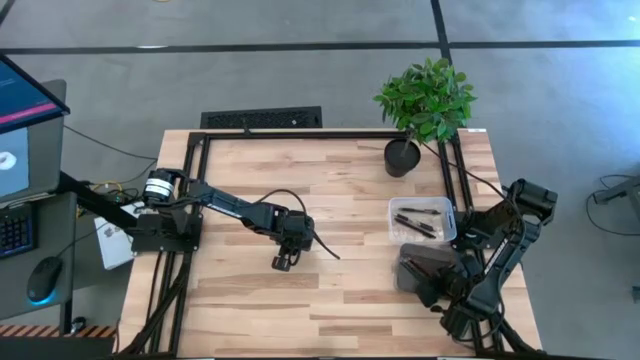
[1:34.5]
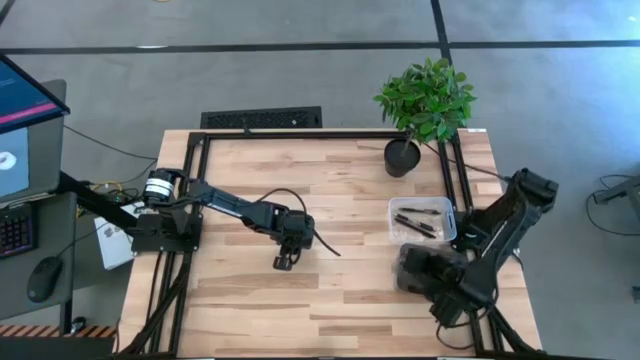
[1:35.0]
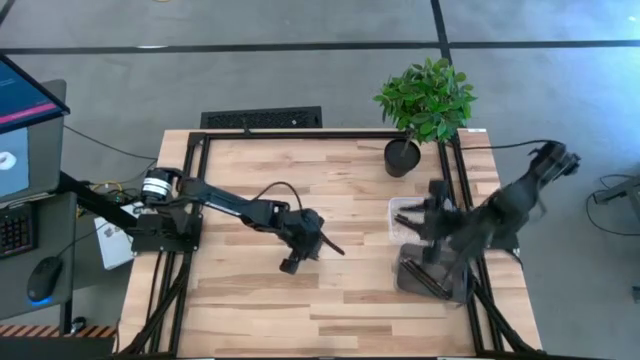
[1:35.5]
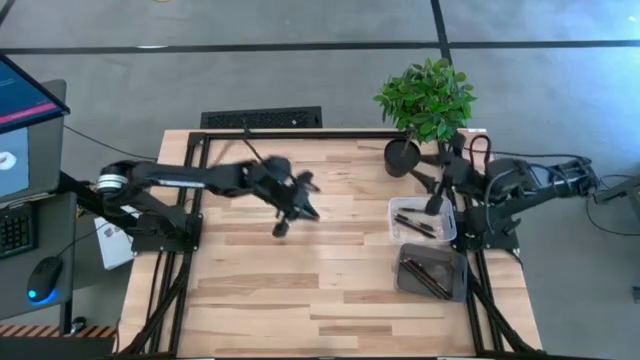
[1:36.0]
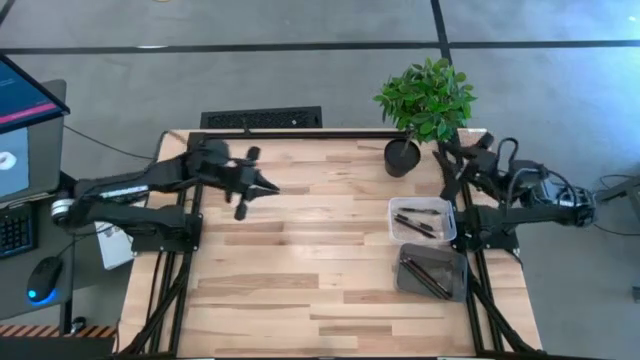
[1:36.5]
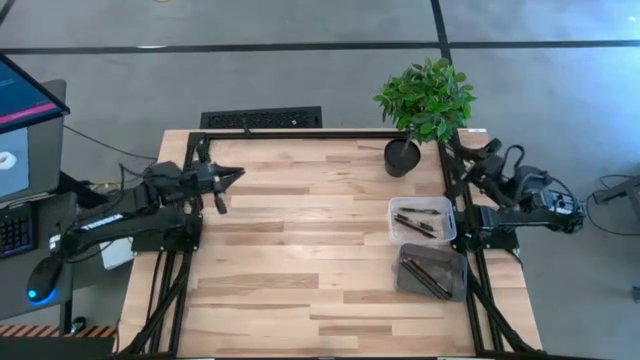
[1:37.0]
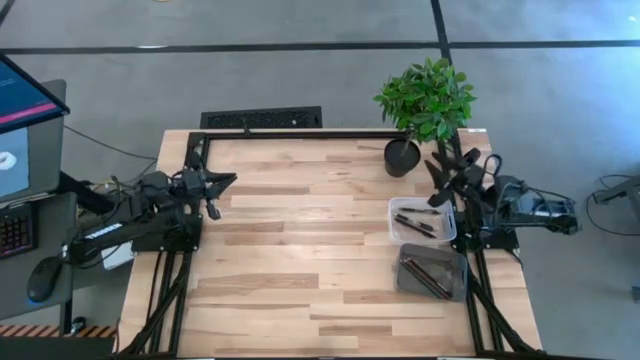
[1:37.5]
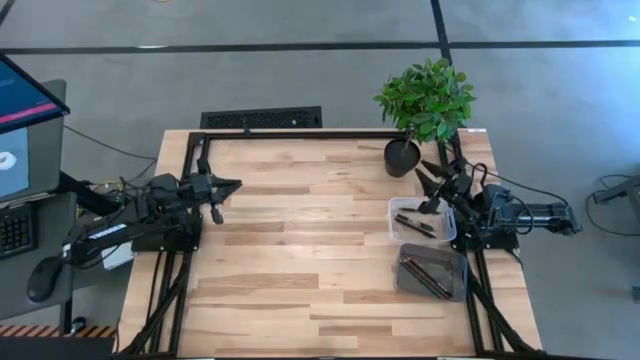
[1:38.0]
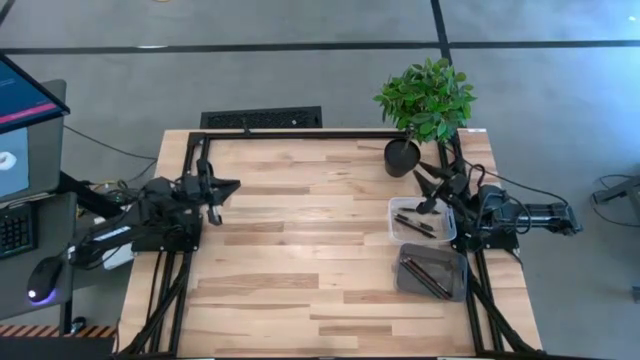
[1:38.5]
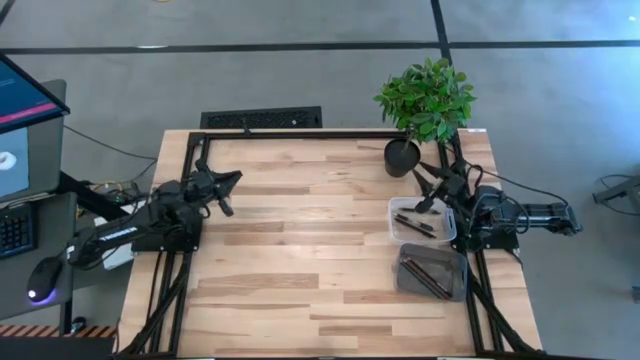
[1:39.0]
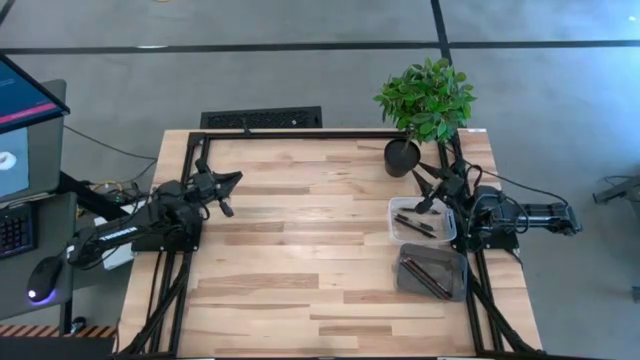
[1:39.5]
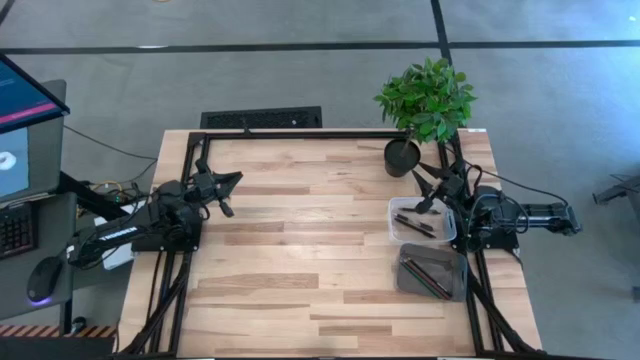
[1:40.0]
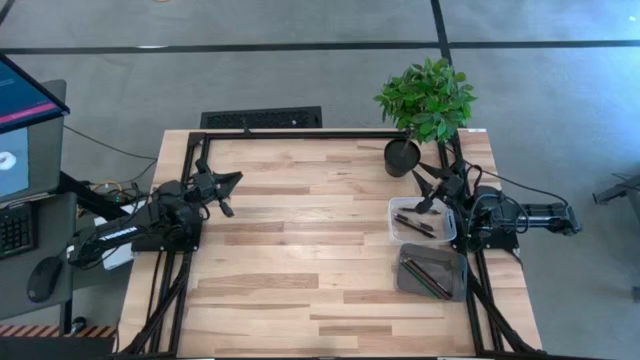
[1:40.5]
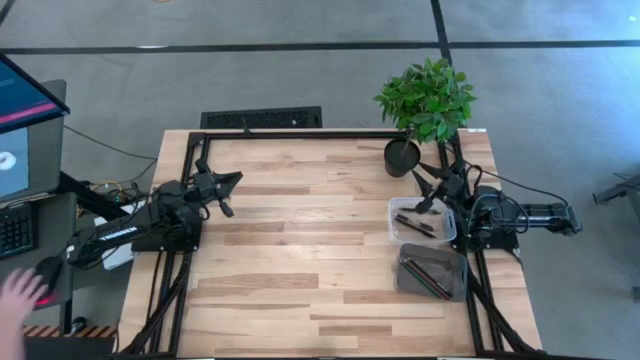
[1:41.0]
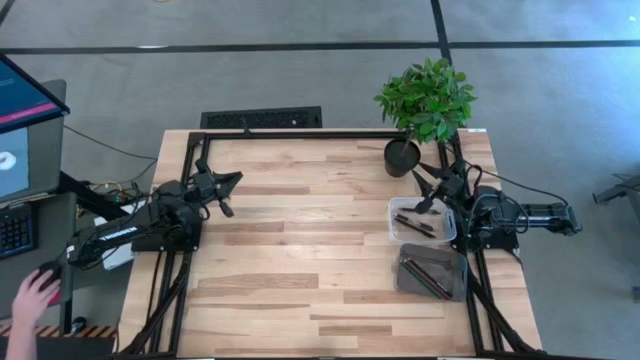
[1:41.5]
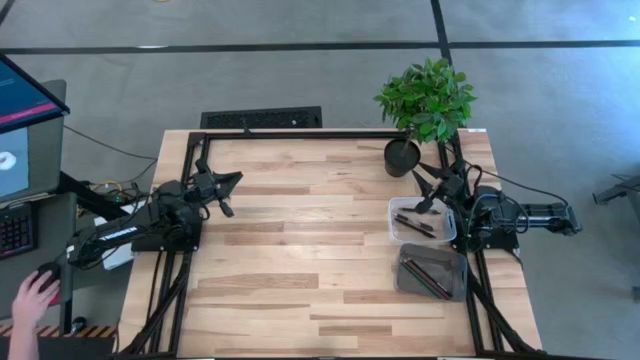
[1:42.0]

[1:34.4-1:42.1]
Task: Sort pens & pencils
Return to Home Position

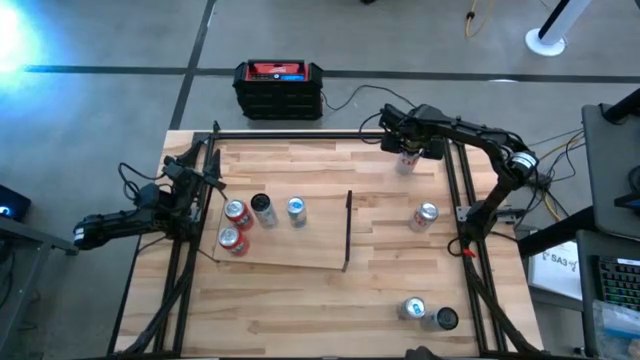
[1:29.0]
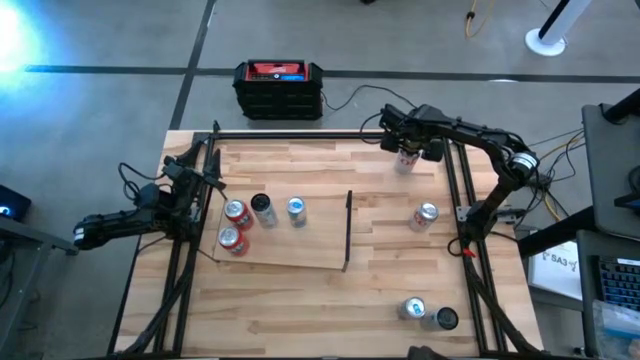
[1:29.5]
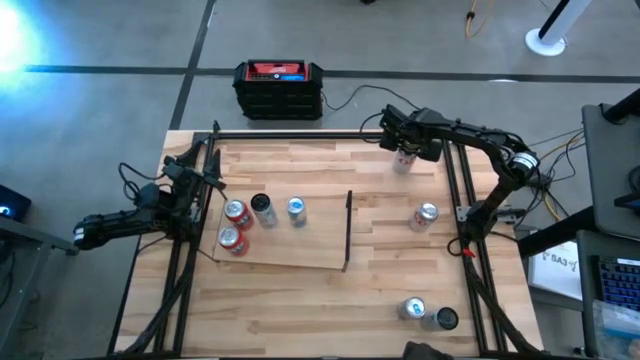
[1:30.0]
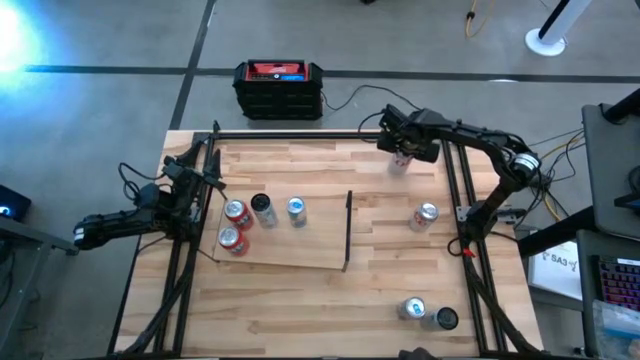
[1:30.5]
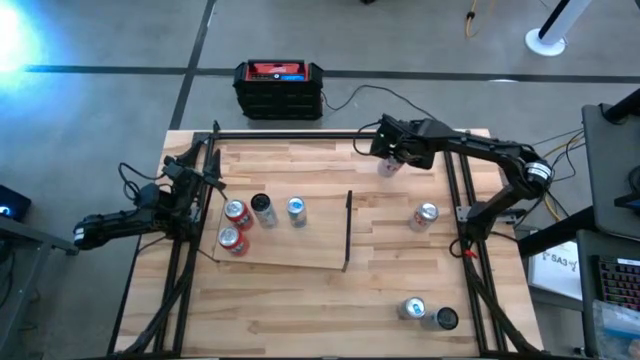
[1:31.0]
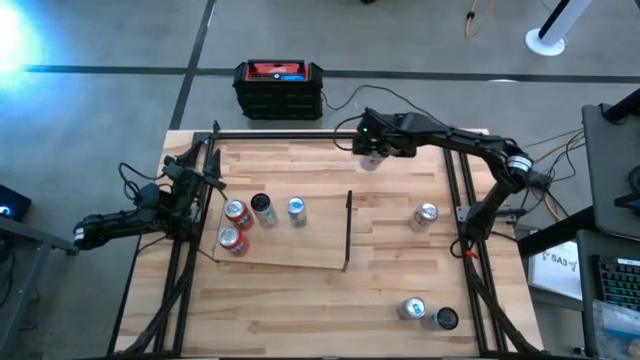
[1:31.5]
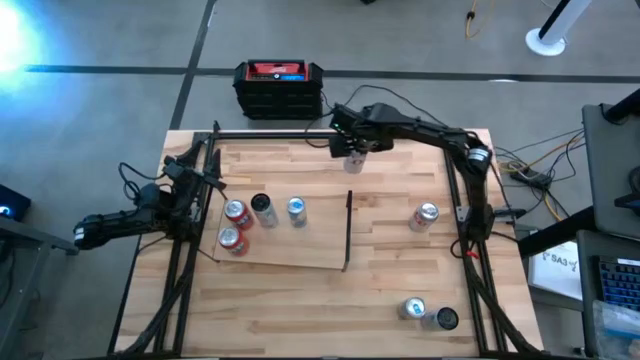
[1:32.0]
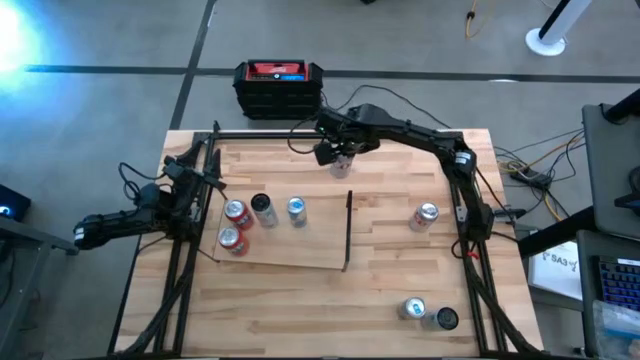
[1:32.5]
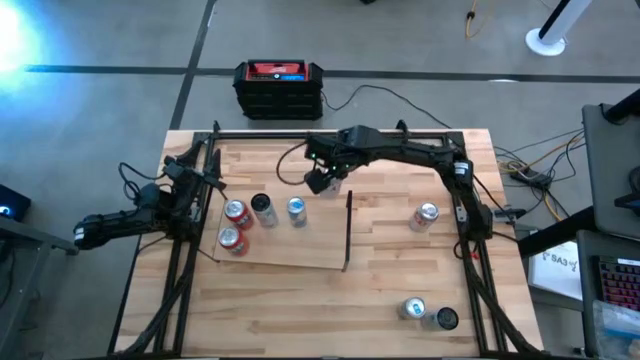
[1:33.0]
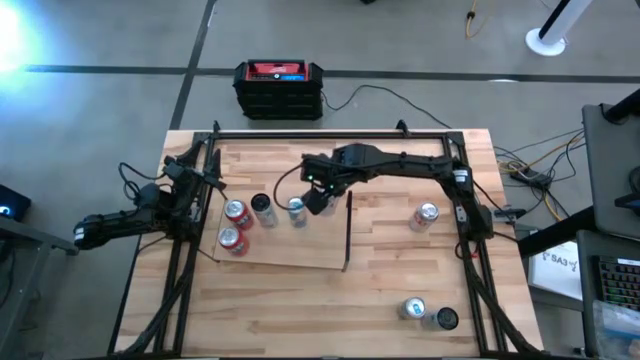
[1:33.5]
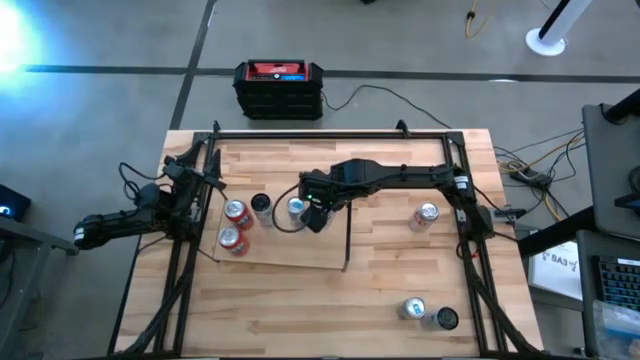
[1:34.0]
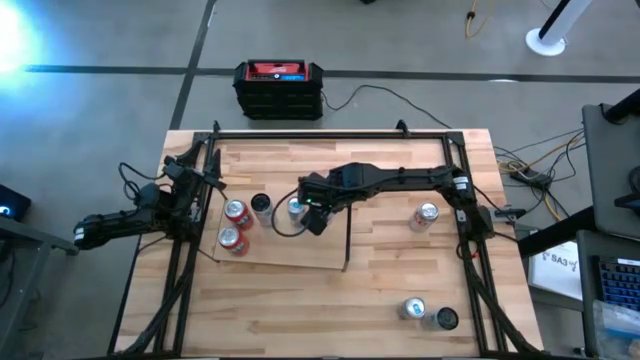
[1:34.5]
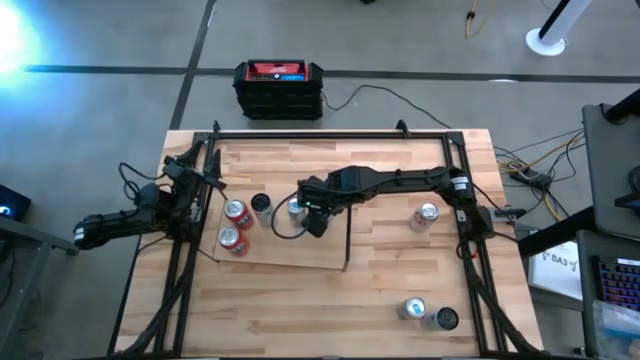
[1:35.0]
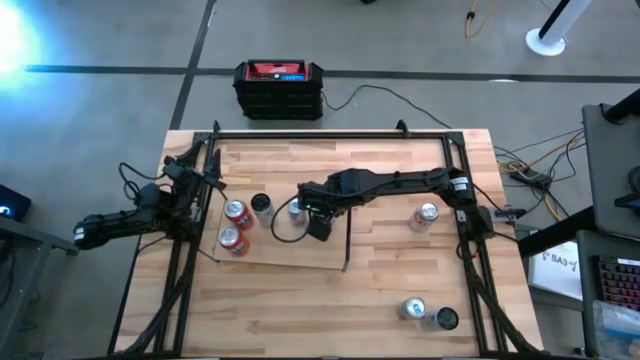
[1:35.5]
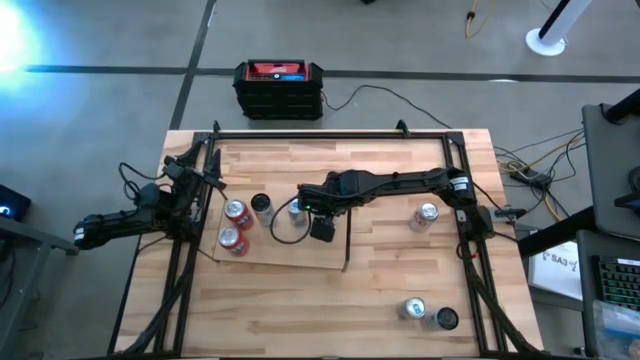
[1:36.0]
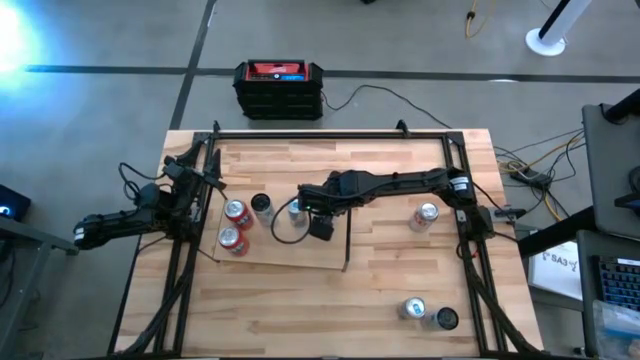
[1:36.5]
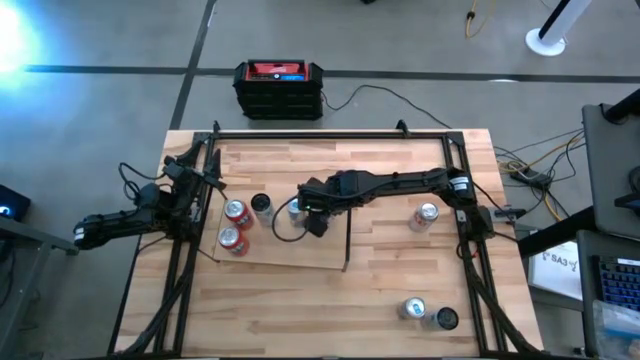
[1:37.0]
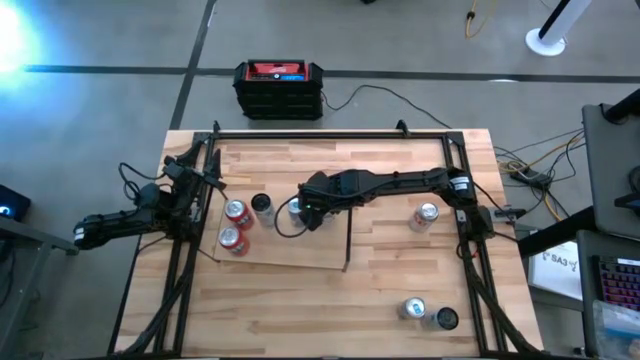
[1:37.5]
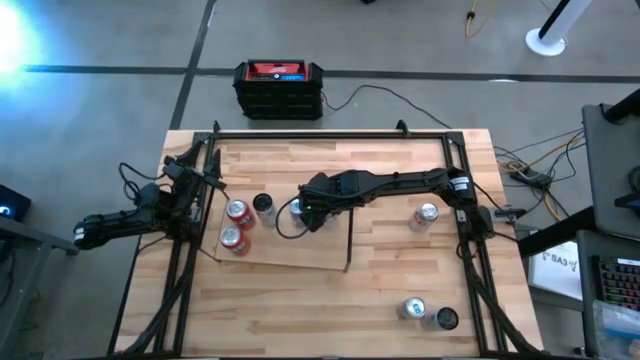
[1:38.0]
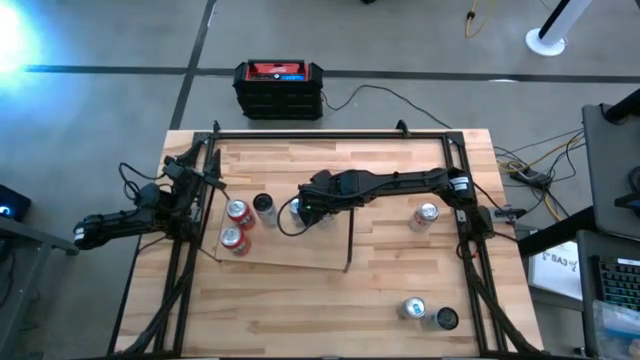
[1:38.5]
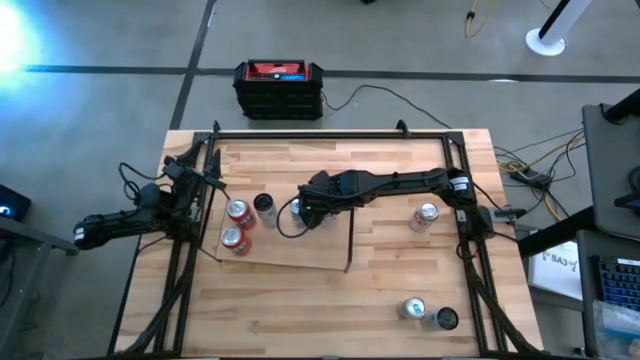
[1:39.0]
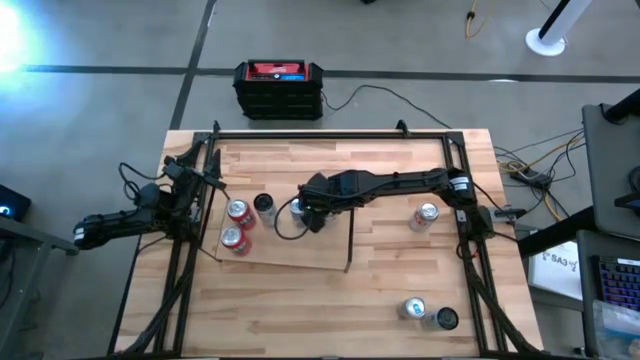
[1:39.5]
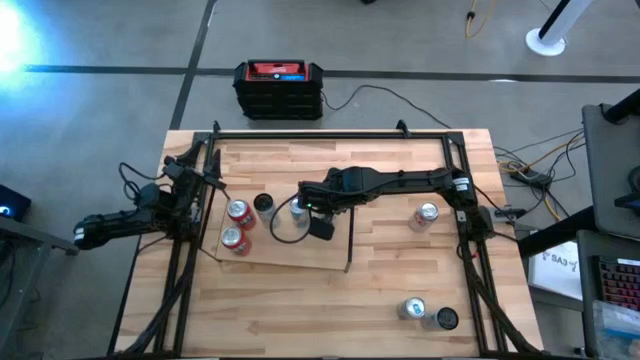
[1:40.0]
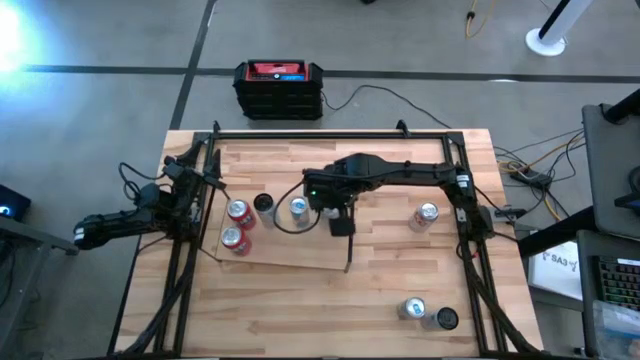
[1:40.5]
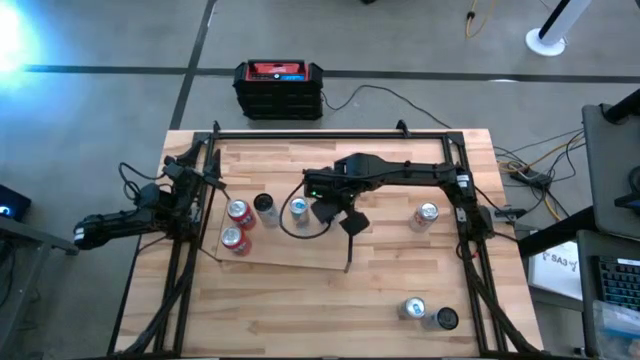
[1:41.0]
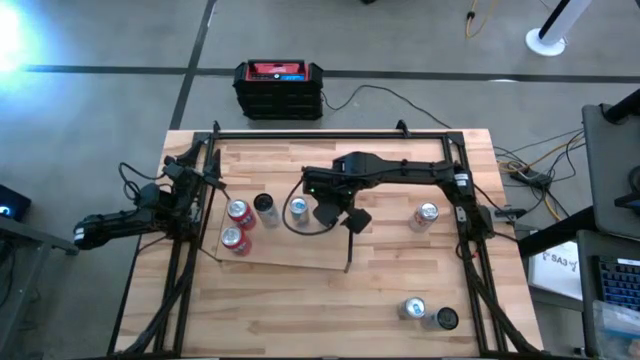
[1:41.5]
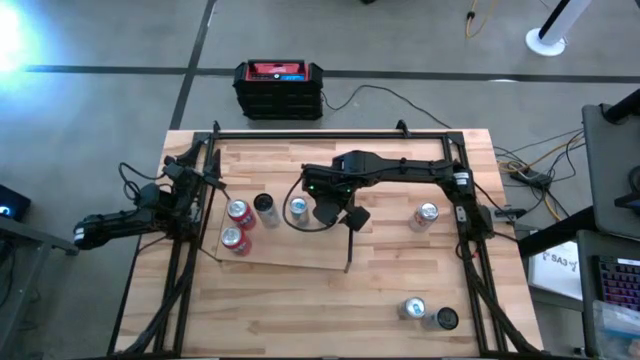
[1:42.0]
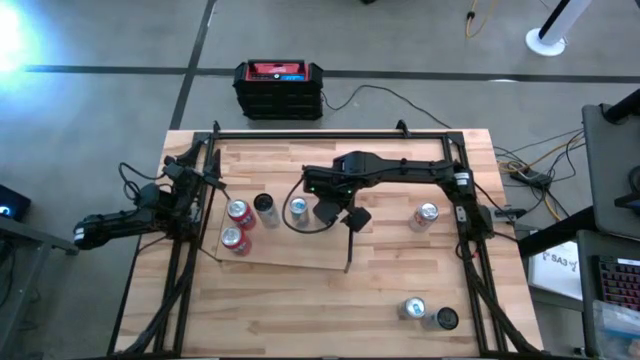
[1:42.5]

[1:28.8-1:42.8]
Task: Place canned beverage on shelf
Put the top silver soda can on the shelf
